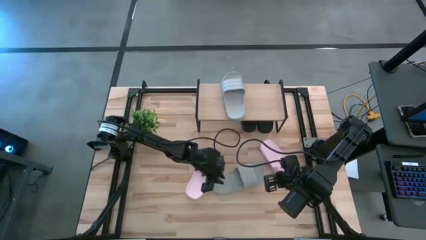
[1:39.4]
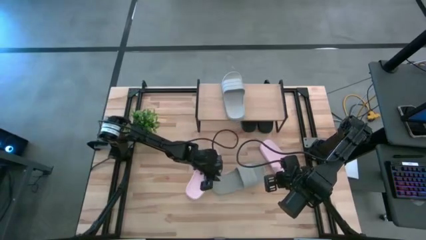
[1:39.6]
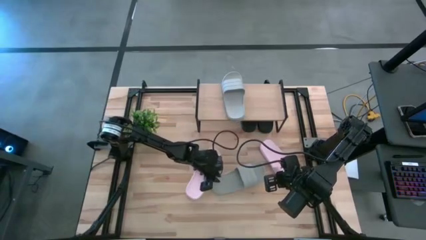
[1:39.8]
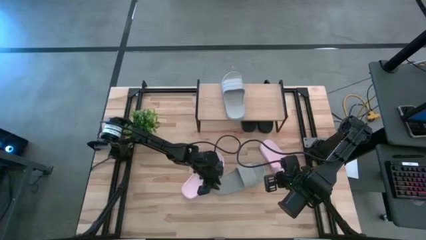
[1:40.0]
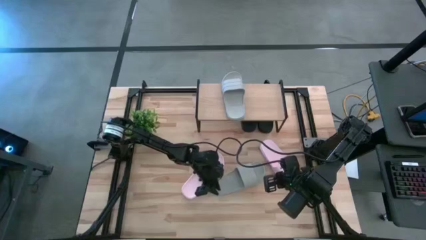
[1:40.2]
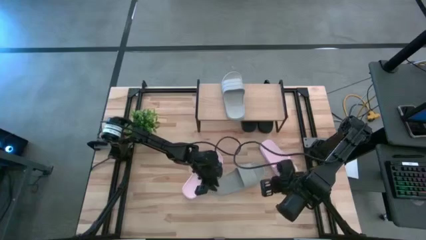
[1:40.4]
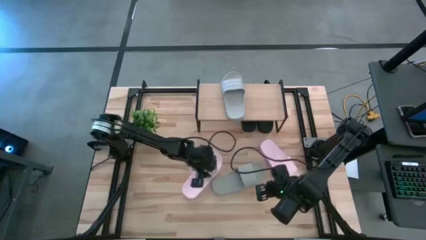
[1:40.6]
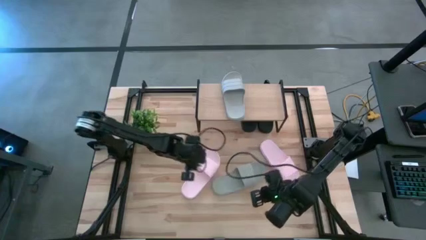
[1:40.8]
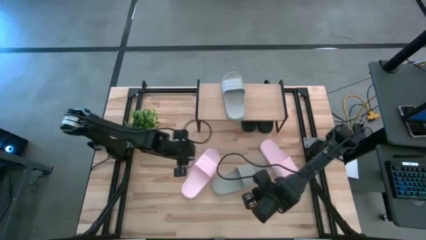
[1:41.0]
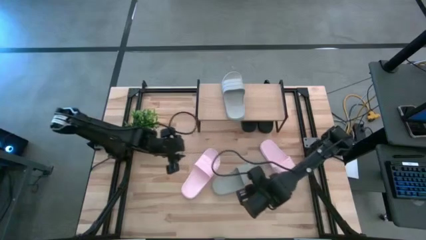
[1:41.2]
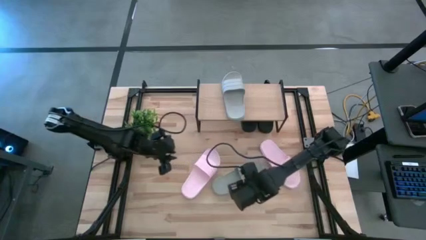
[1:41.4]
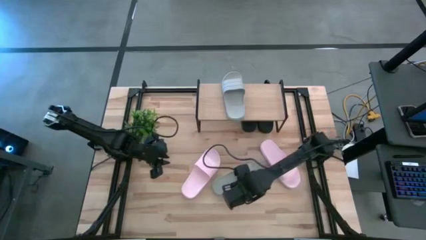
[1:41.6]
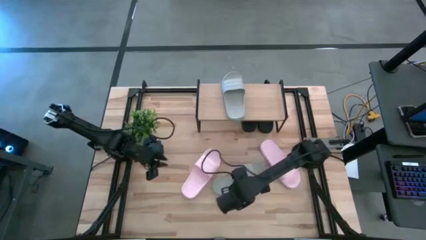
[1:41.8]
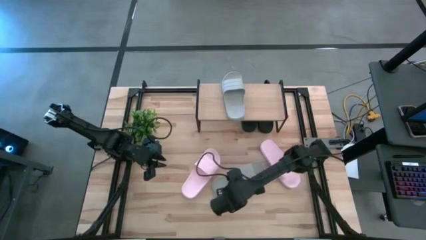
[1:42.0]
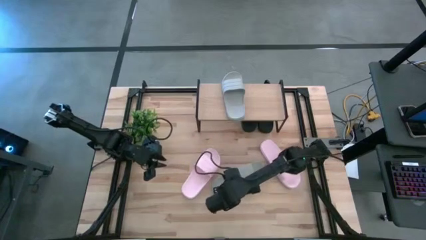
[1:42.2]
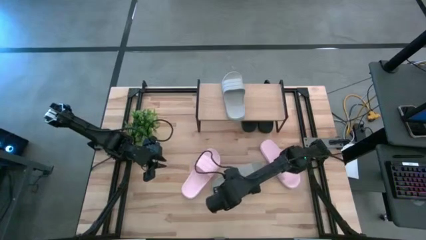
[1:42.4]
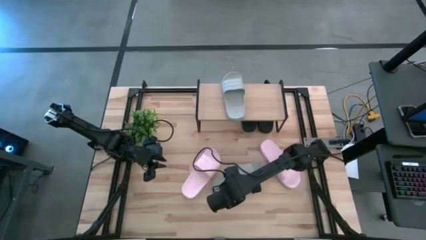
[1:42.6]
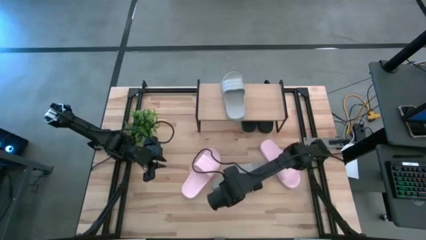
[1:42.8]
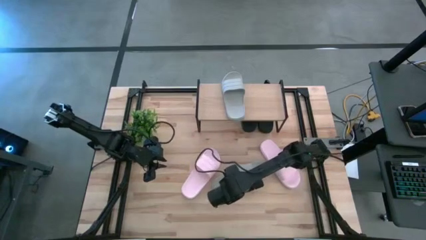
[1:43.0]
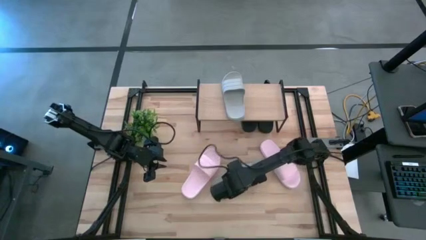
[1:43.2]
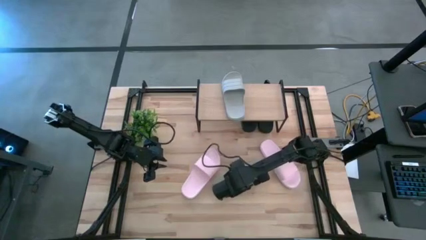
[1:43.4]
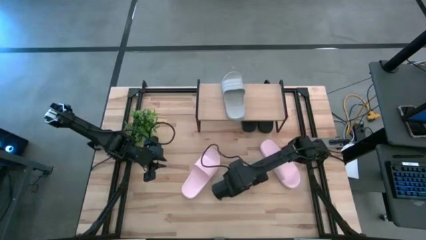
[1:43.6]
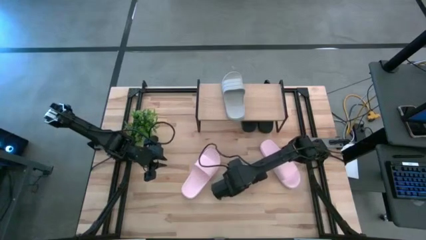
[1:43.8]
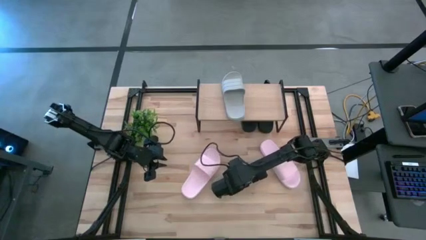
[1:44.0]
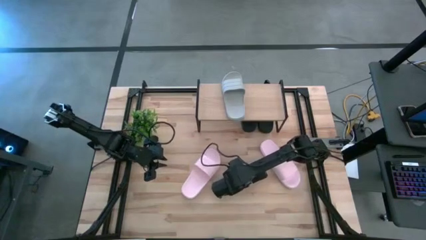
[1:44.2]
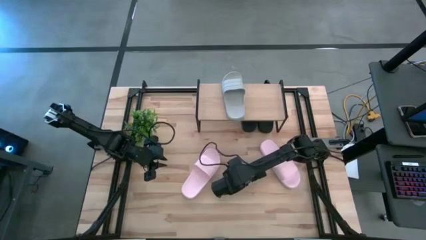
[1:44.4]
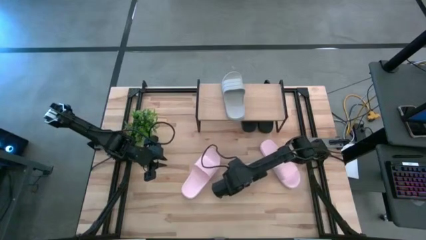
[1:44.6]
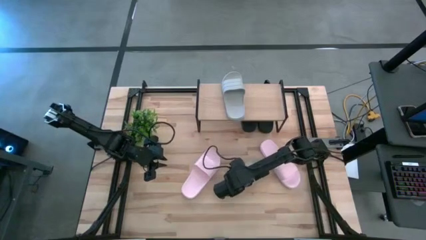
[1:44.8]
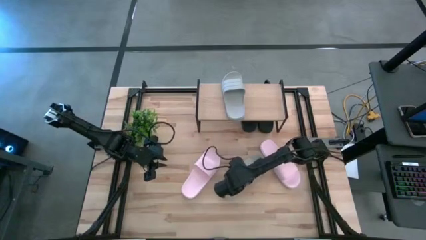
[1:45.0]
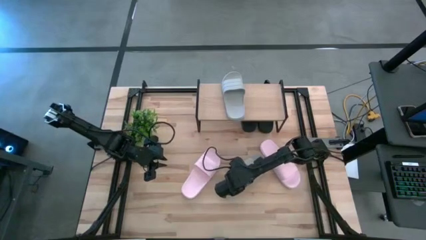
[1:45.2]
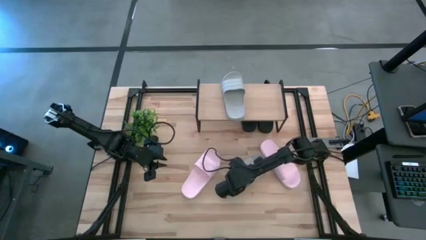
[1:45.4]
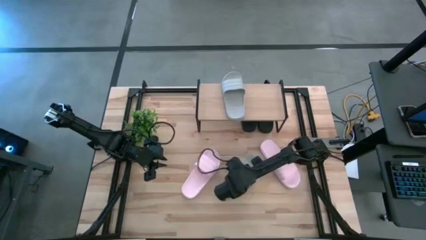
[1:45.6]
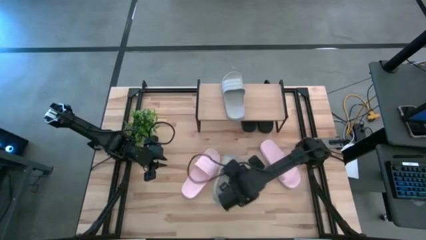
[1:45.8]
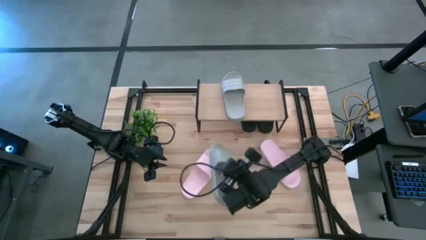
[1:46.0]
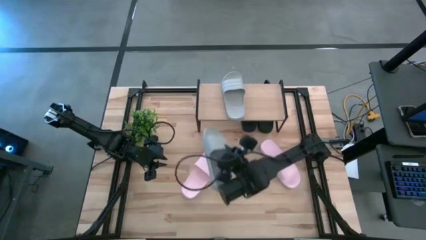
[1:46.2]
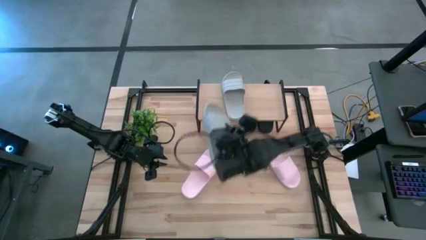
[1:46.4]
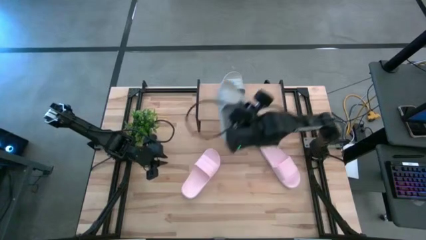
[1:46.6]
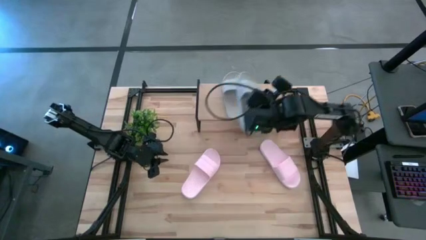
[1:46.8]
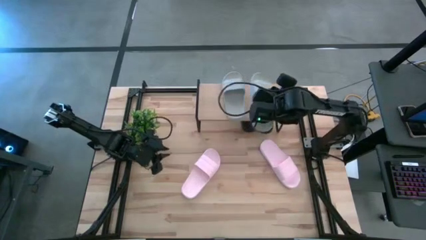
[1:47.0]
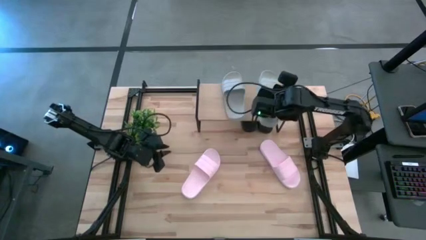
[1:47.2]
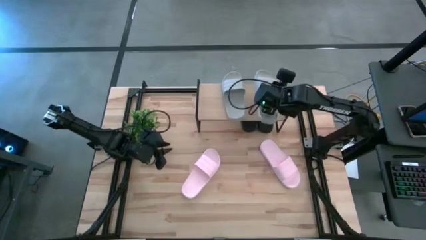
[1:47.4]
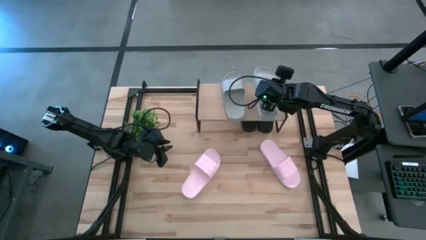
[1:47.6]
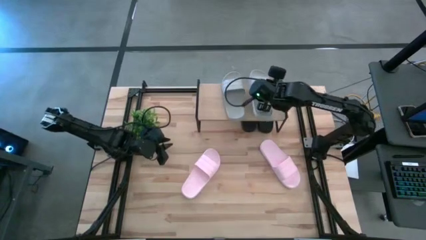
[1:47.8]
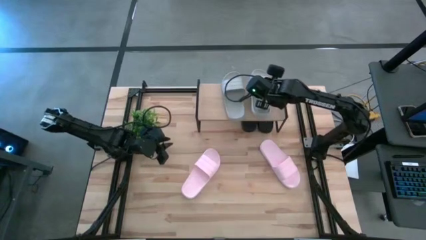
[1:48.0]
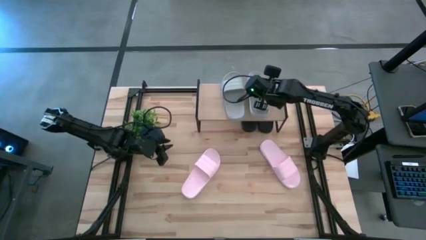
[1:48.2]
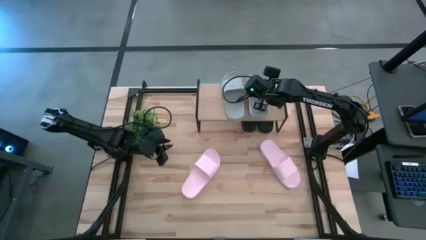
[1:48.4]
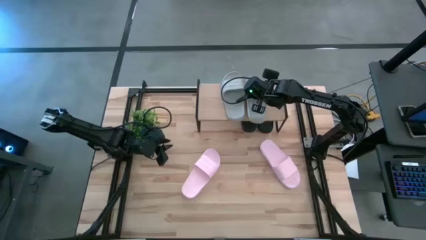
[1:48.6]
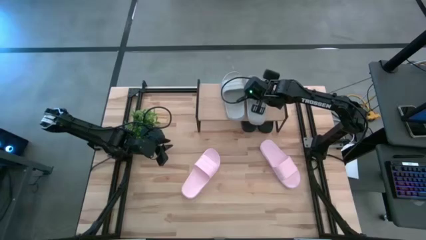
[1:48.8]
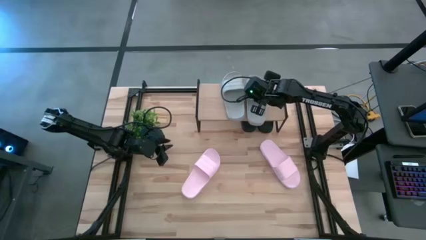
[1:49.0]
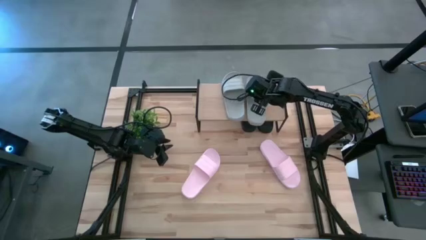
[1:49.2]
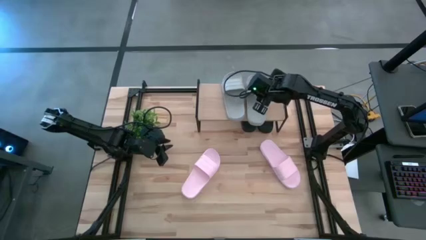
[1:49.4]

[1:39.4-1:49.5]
Task: Pick and place slides into the shelf
Put the gray slipper on the shelf

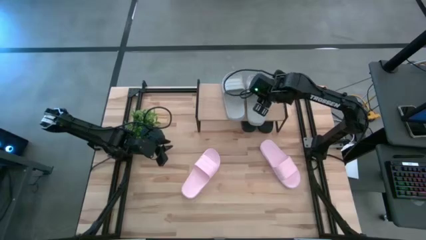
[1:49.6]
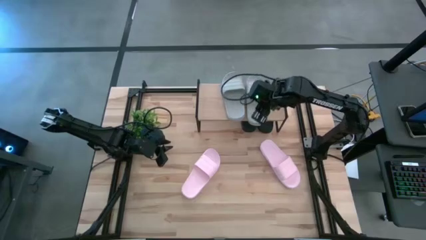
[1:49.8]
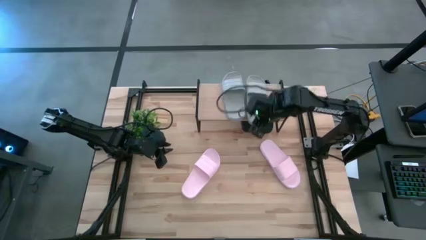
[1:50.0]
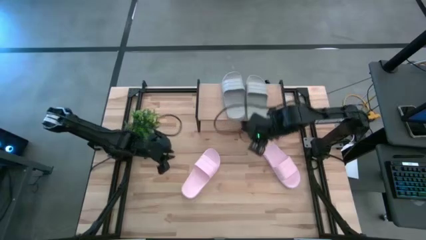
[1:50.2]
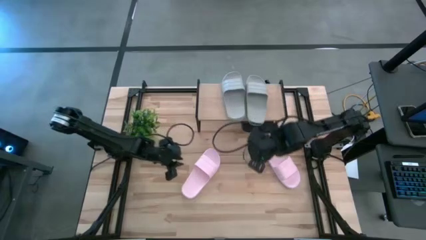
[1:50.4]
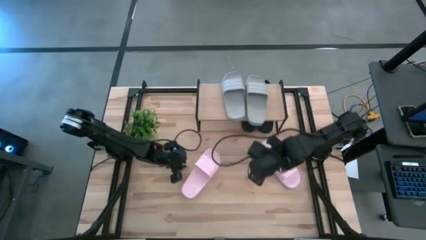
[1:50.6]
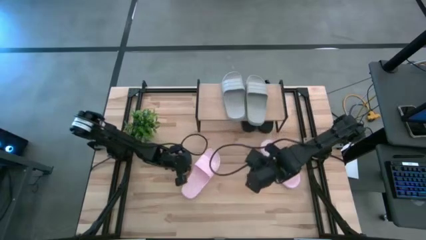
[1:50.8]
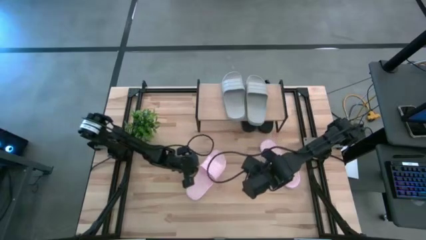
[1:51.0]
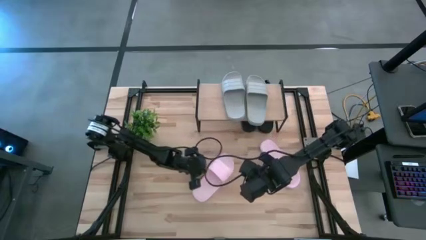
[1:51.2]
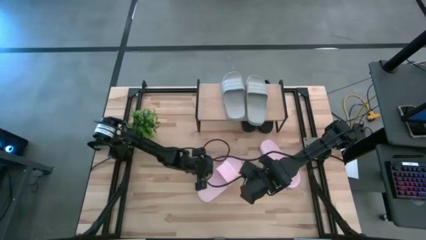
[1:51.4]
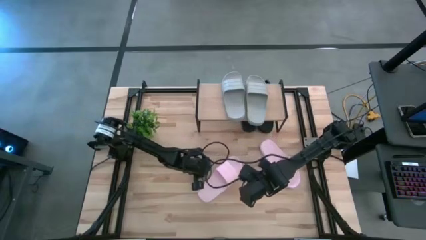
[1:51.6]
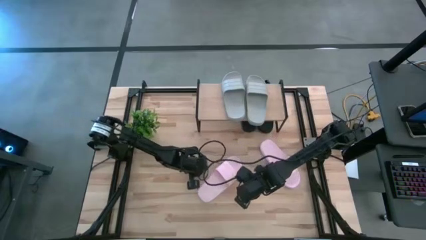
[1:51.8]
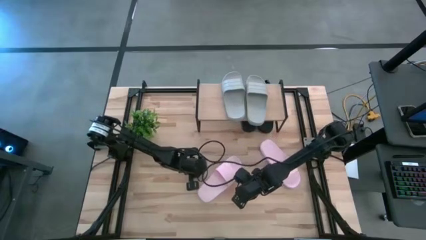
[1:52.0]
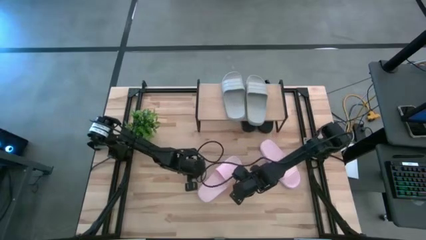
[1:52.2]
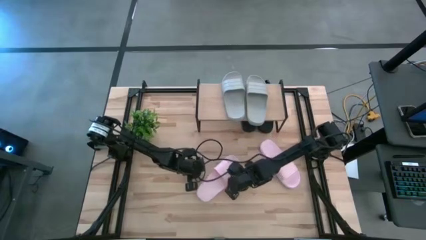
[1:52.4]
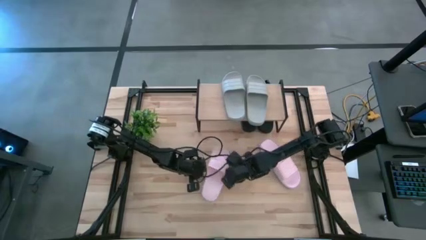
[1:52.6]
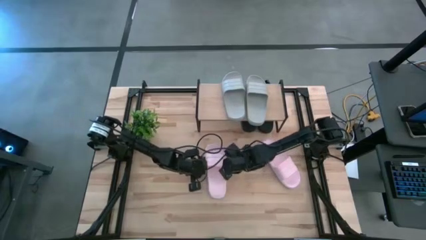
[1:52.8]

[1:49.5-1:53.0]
Adjust the left pink slipper
